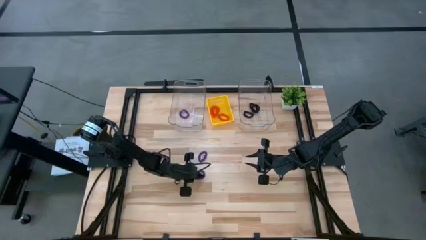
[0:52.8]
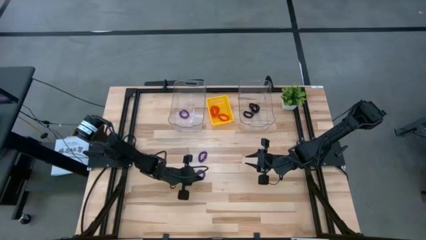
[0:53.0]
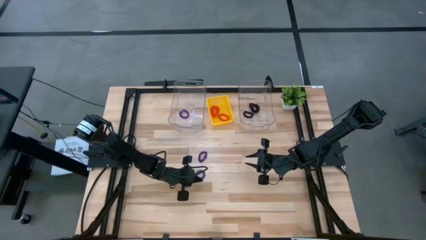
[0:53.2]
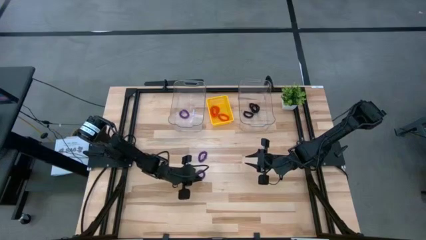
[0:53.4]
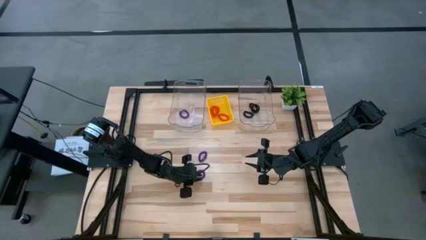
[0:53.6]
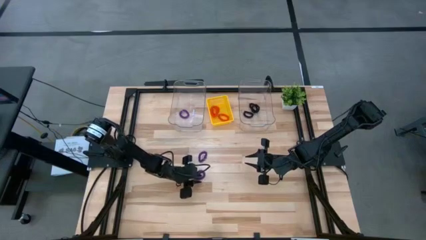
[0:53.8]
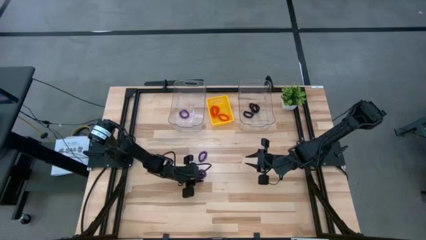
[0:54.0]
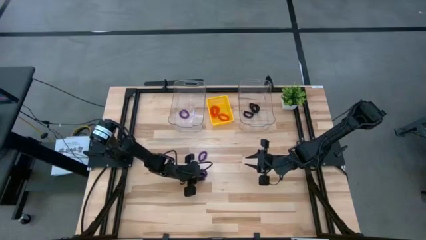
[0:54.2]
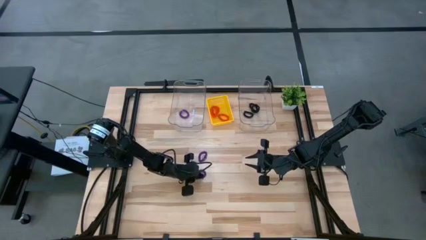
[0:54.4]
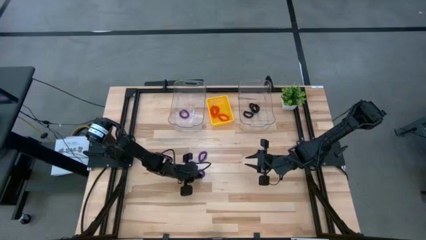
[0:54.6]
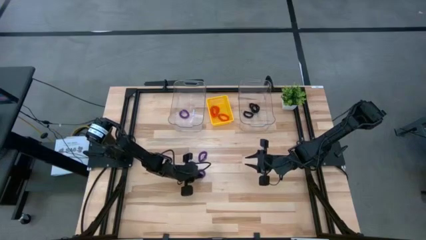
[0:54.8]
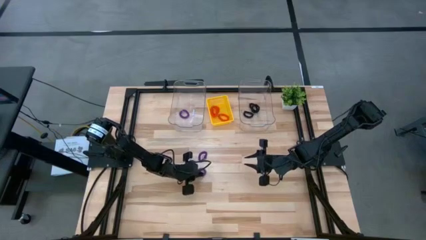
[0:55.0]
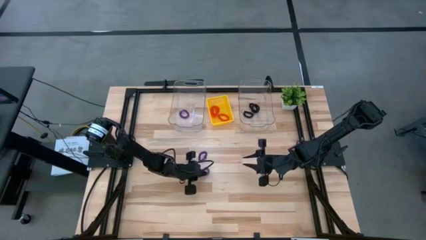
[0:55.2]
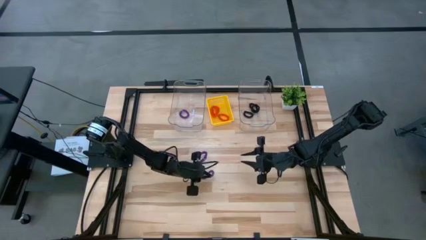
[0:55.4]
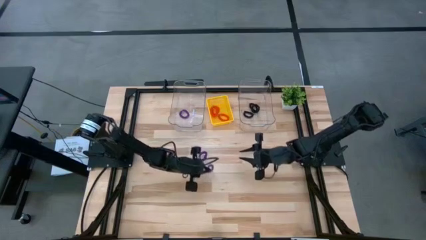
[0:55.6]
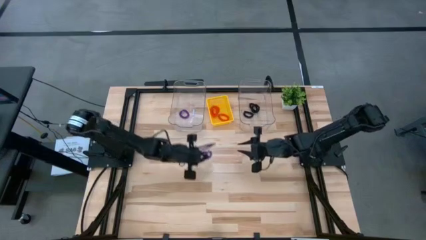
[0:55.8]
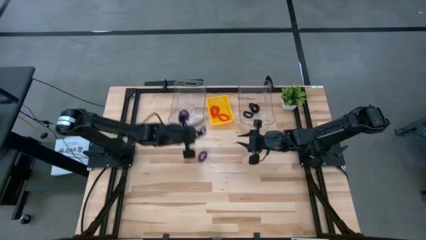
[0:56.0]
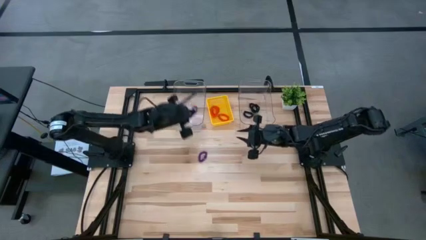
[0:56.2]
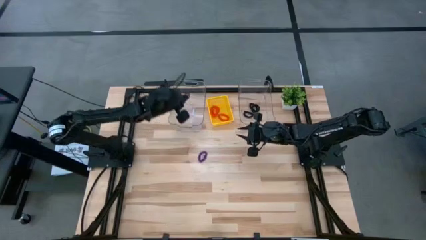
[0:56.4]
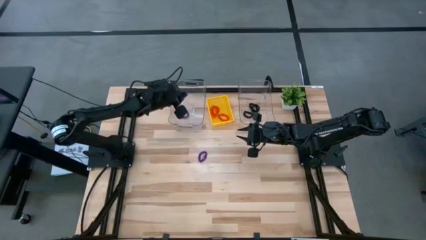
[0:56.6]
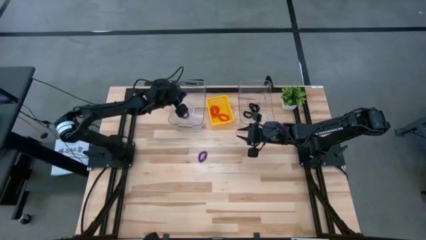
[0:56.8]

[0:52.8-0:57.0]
Task: Sort spring keychains
Put the bottom purple spring keychain into the left transparent bin

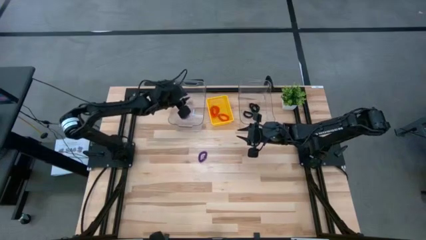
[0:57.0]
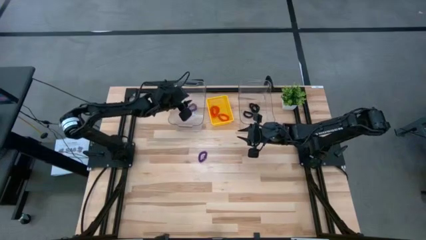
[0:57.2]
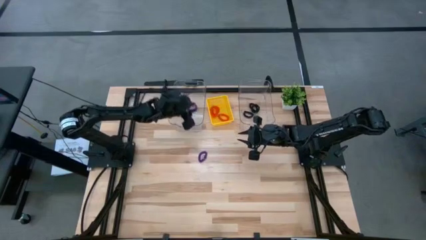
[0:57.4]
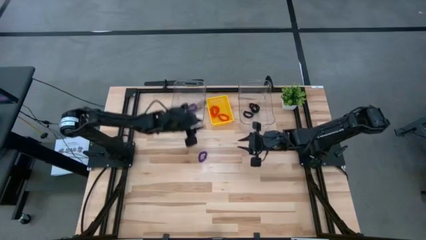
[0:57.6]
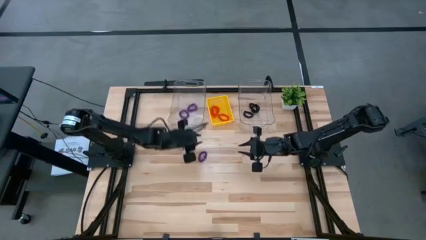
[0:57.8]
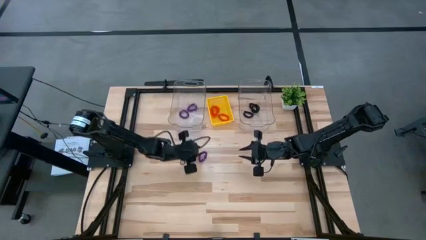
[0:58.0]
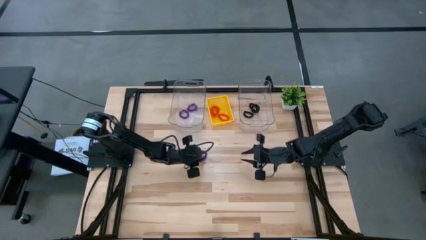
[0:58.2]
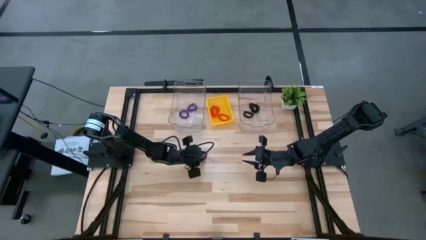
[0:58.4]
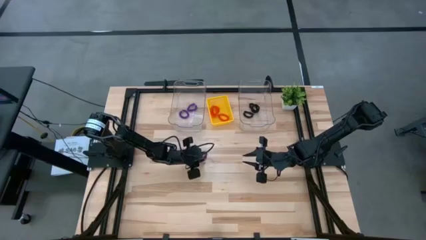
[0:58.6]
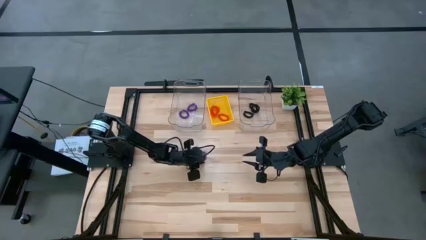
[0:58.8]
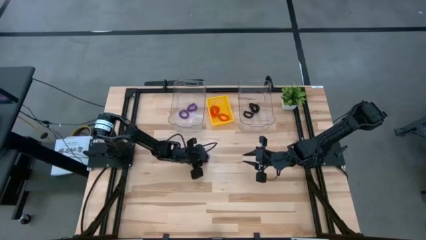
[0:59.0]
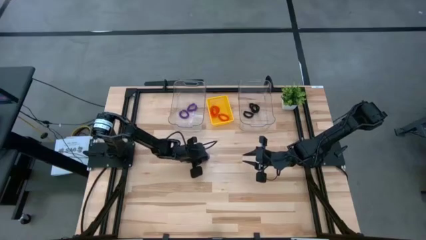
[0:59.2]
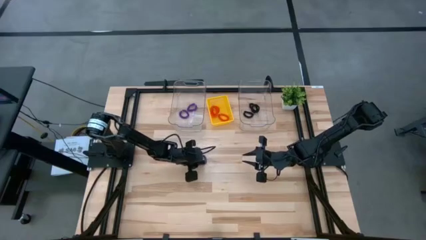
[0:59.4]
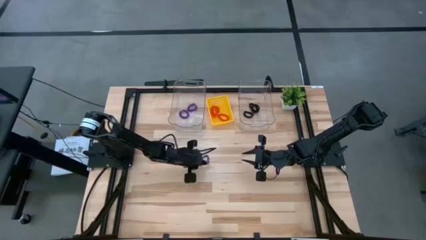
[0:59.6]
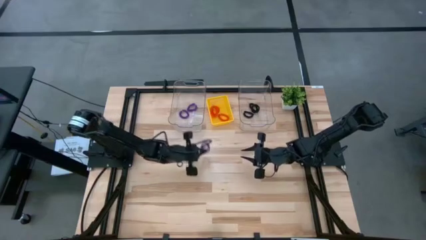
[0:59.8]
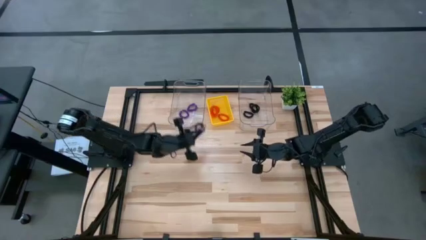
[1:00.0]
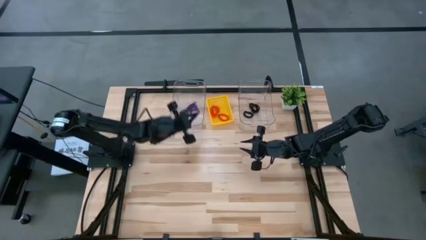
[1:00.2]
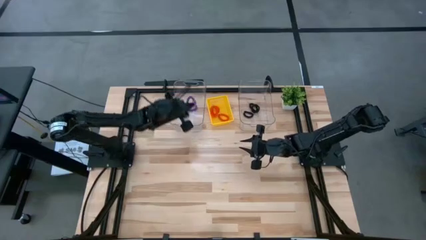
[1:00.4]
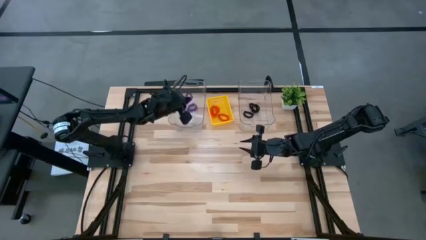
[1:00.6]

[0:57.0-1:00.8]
Put the purple spring keychain into the left transparent bin

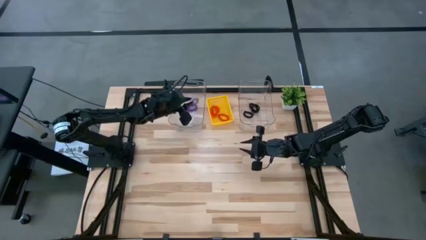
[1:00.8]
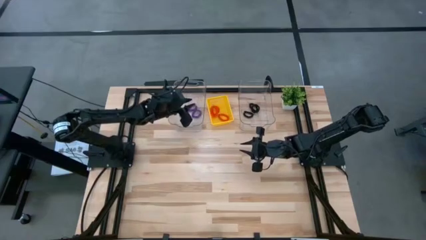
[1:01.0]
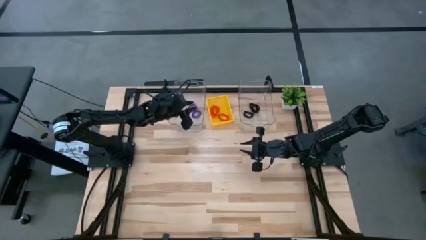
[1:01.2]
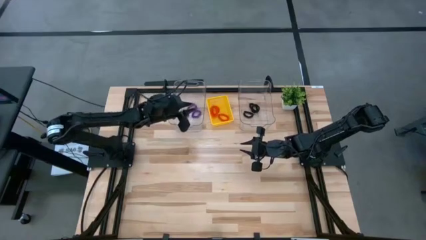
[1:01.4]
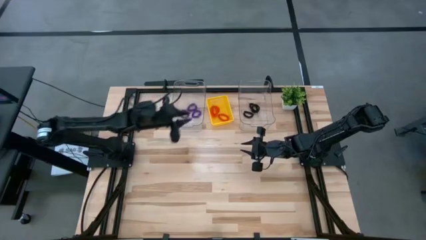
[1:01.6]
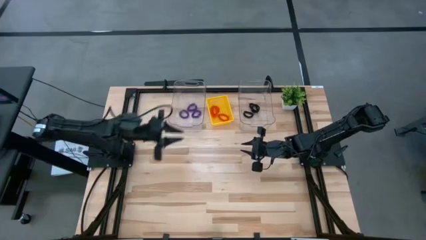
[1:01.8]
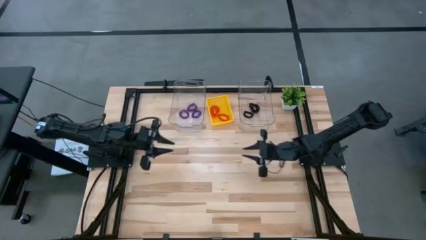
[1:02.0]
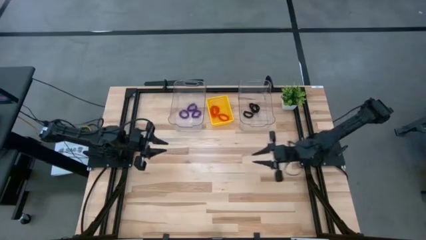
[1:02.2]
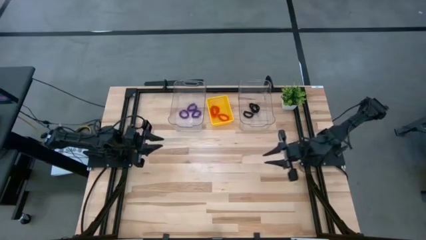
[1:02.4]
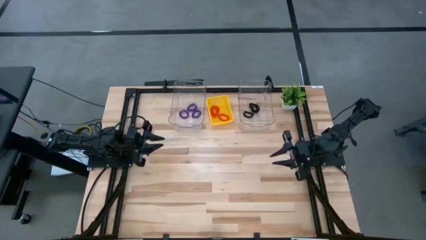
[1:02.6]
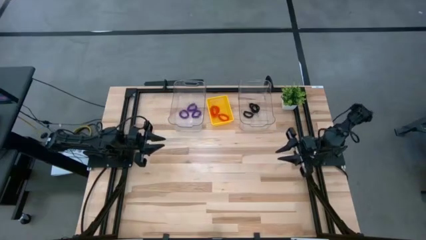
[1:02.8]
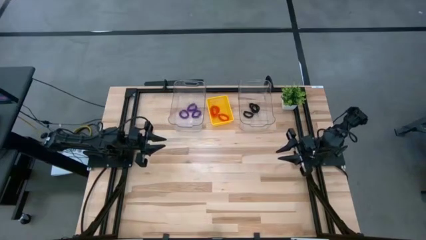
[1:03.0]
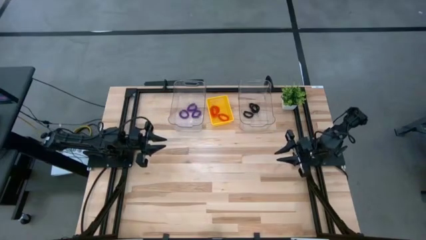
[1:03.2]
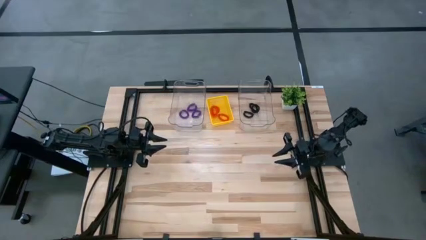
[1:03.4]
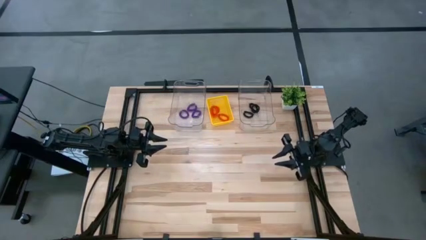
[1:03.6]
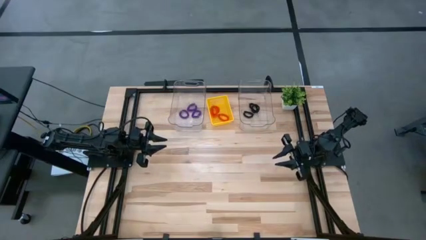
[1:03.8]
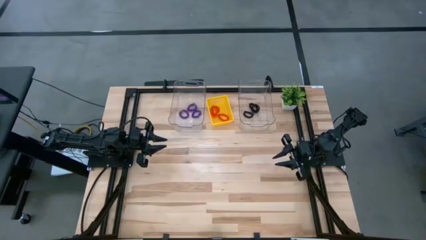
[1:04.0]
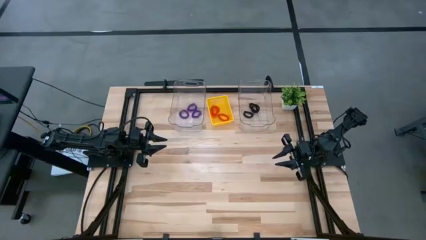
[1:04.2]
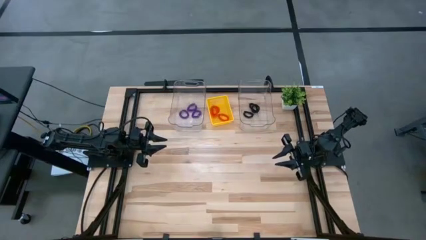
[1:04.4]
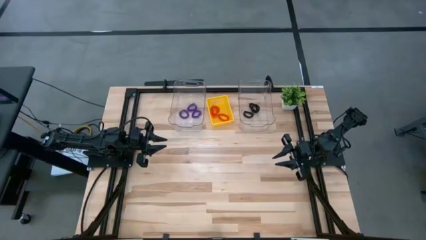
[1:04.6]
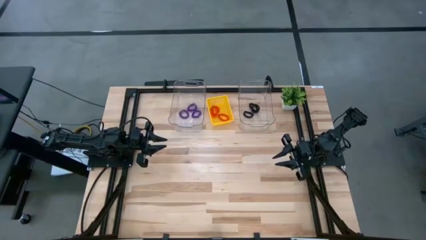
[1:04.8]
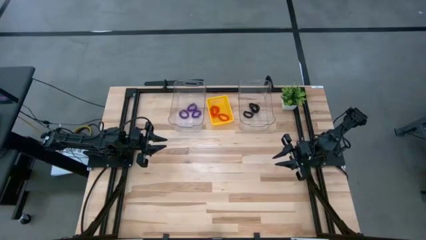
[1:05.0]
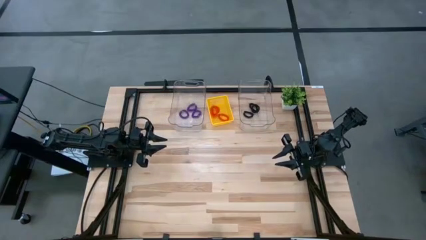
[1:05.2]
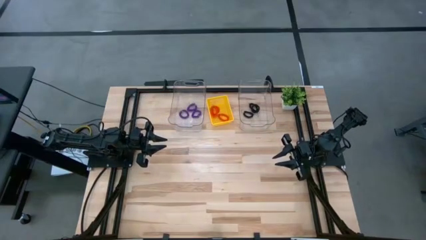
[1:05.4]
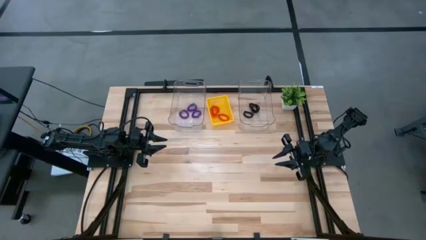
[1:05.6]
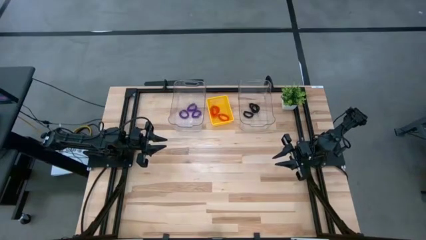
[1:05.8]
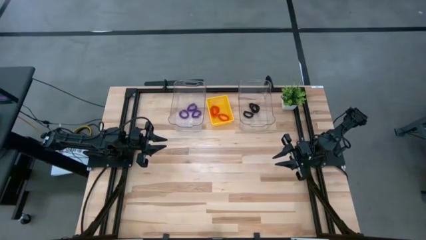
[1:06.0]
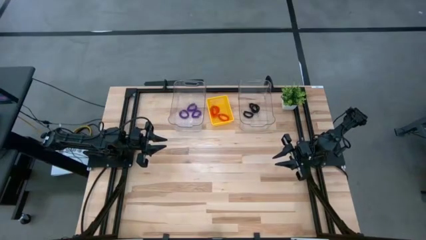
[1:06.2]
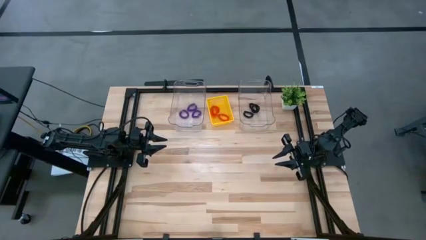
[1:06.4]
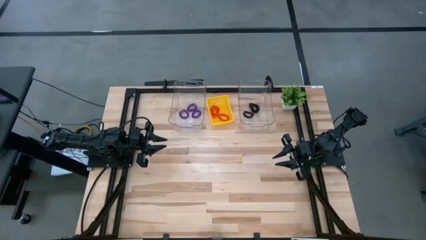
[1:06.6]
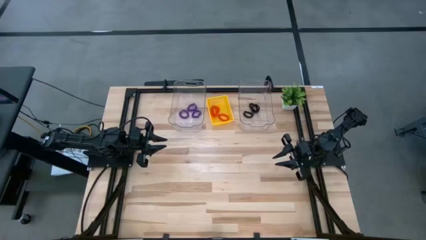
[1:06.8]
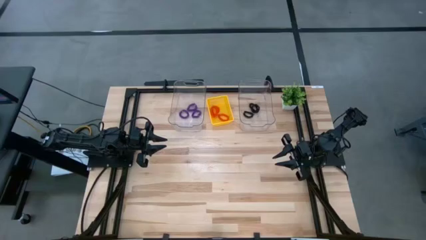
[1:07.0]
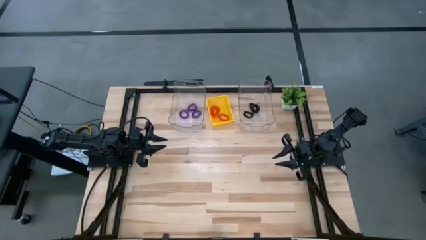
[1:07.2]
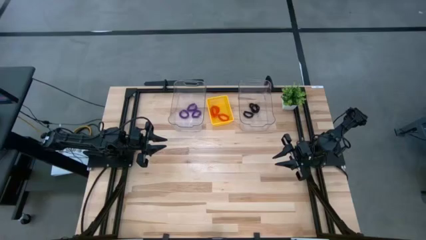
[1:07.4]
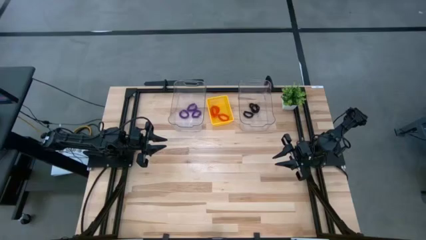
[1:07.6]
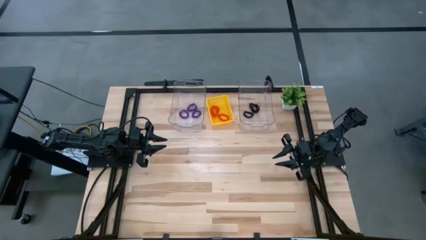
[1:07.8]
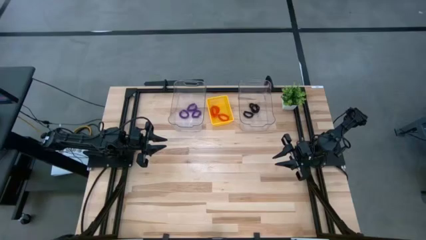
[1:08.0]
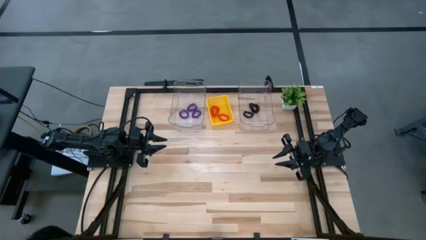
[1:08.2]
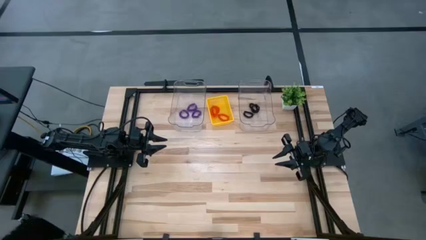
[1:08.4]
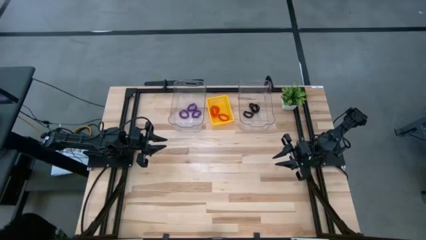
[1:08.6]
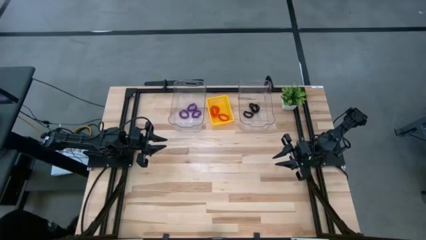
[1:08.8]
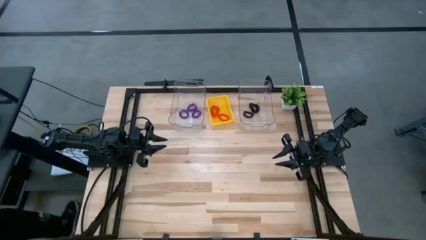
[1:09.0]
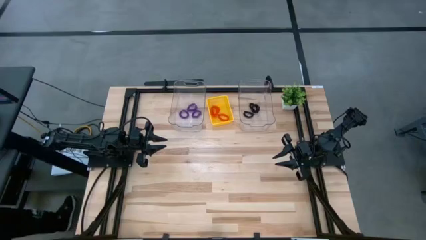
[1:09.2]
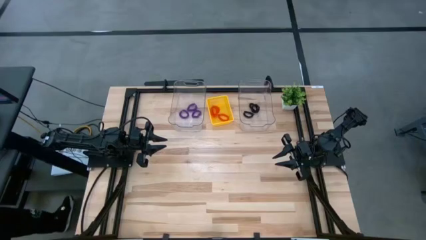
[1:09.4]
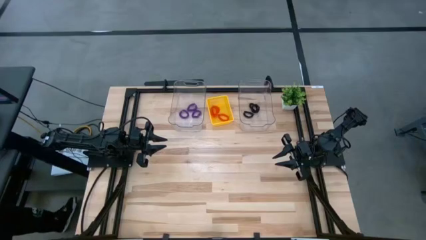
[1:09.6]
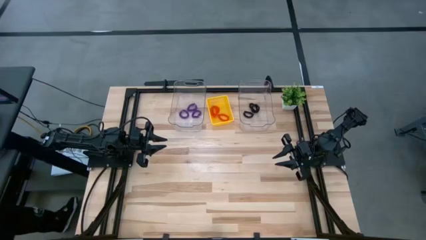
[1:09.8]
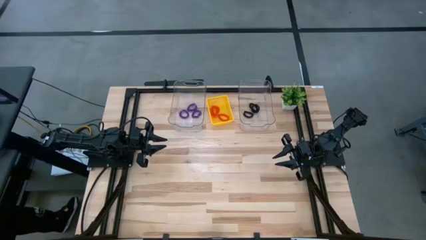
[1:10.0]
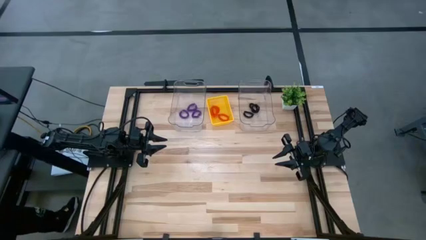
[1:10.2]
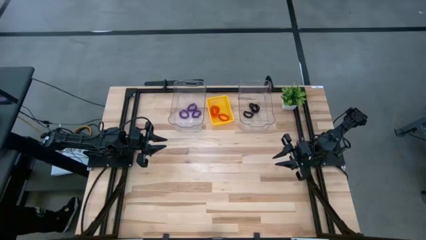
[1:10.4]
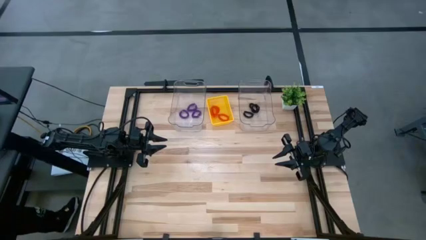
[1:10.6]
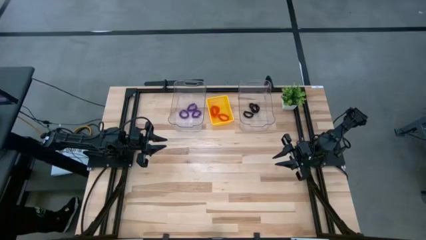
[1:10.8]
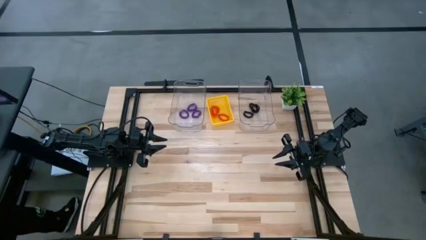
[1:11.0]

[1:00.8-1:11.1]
Return to Home Position
